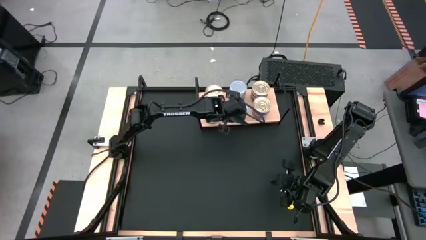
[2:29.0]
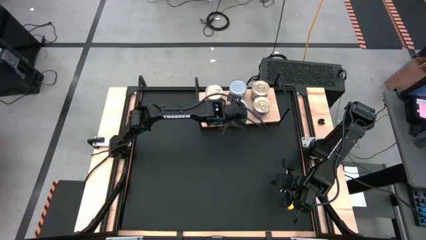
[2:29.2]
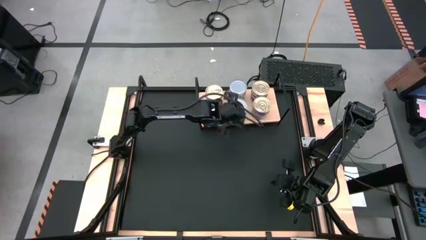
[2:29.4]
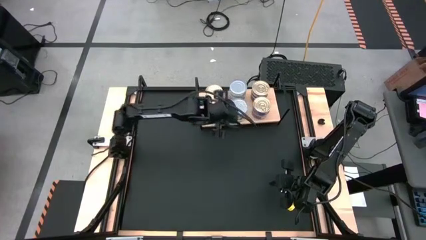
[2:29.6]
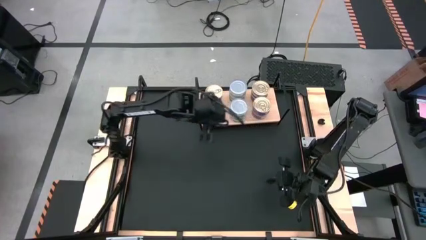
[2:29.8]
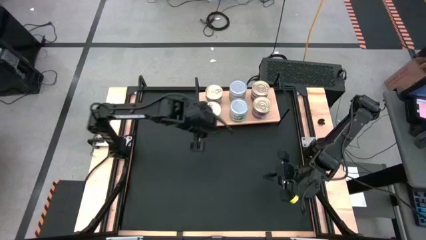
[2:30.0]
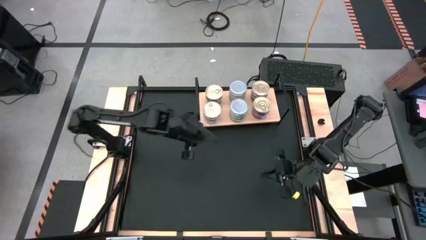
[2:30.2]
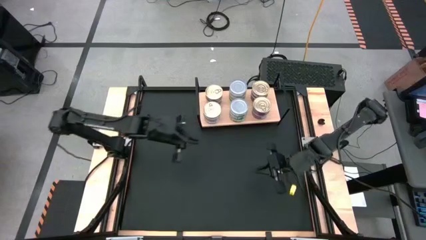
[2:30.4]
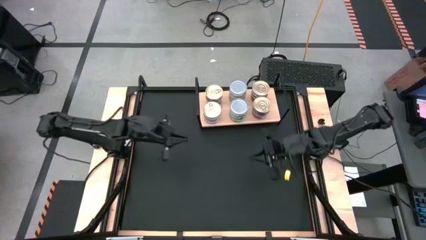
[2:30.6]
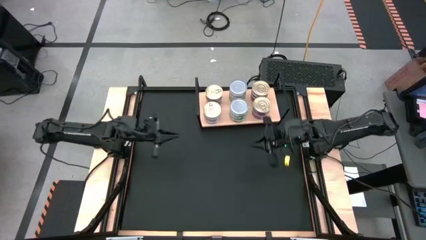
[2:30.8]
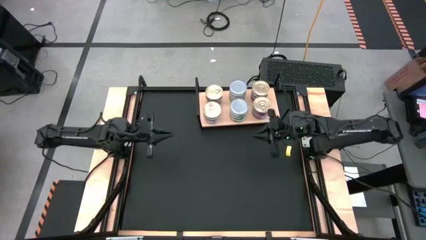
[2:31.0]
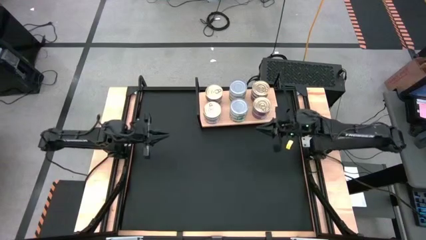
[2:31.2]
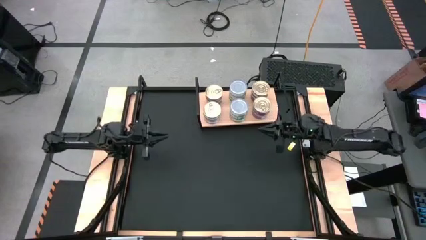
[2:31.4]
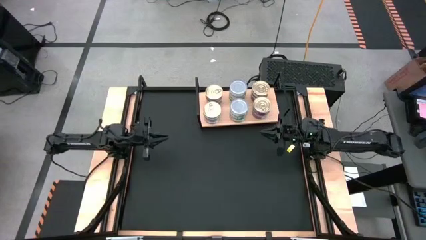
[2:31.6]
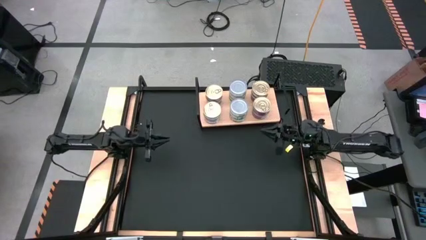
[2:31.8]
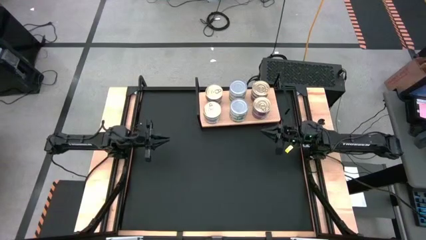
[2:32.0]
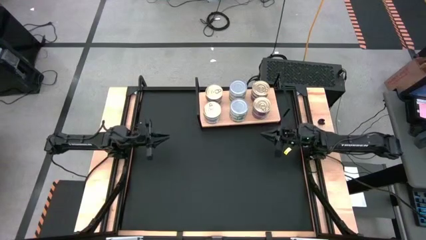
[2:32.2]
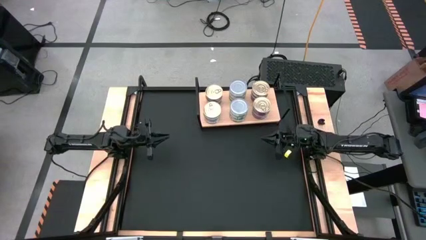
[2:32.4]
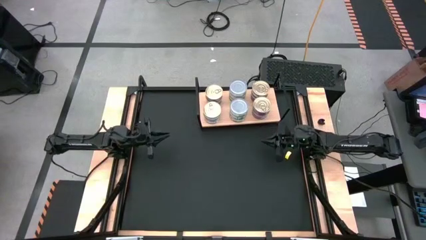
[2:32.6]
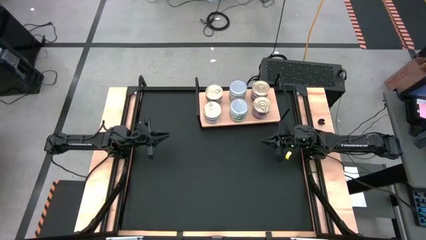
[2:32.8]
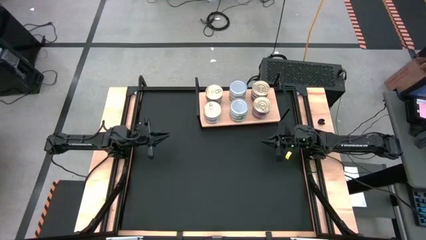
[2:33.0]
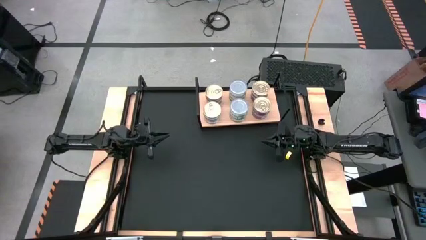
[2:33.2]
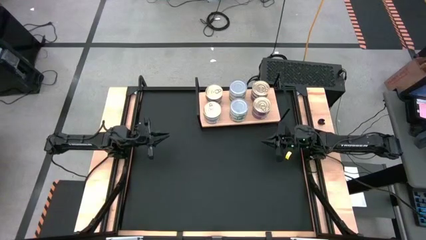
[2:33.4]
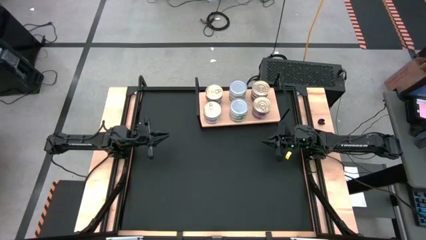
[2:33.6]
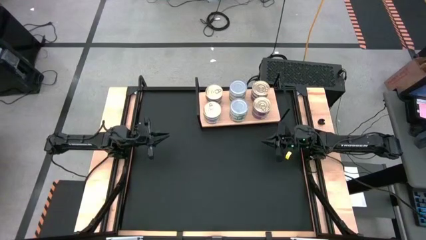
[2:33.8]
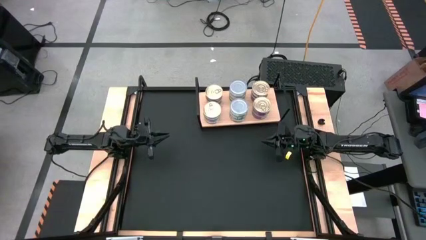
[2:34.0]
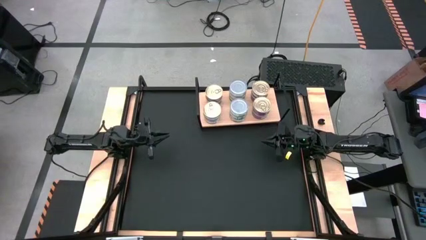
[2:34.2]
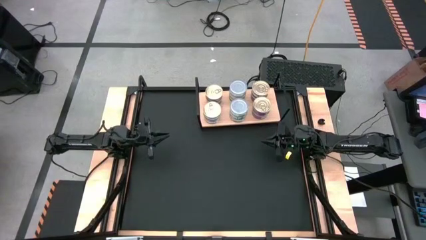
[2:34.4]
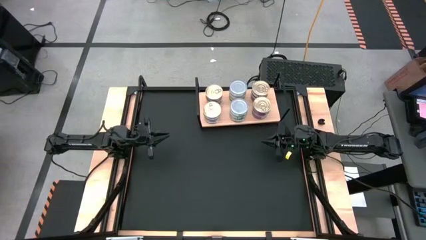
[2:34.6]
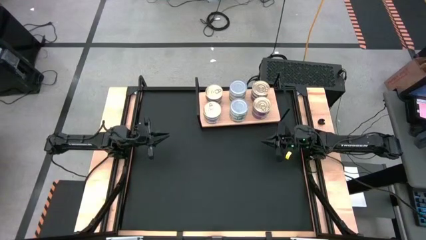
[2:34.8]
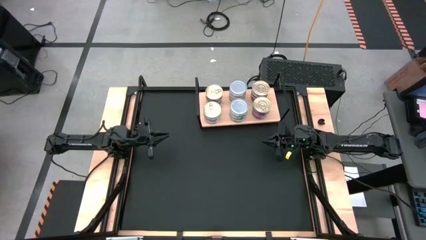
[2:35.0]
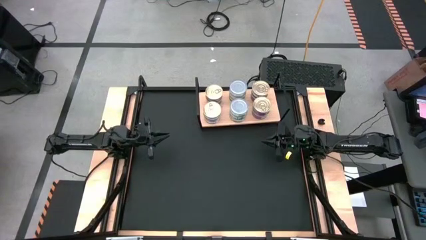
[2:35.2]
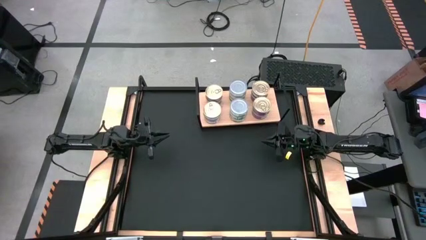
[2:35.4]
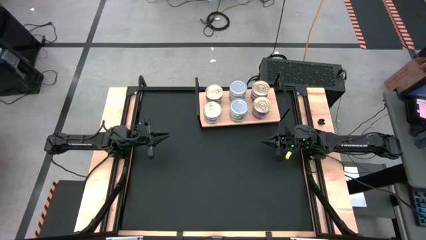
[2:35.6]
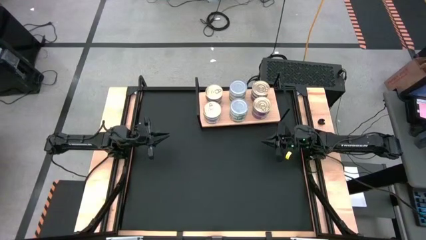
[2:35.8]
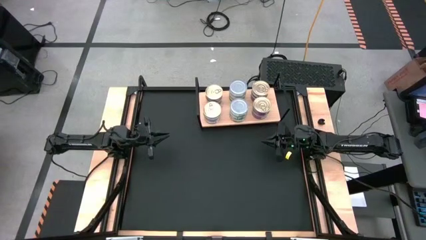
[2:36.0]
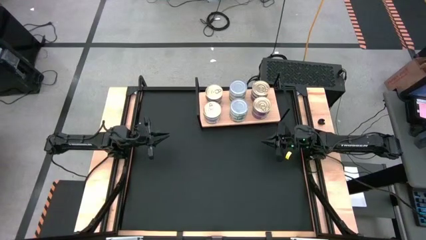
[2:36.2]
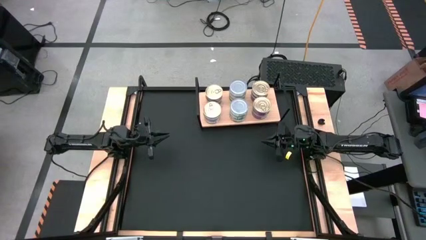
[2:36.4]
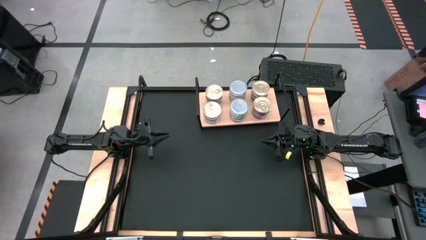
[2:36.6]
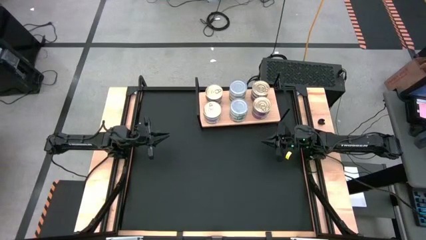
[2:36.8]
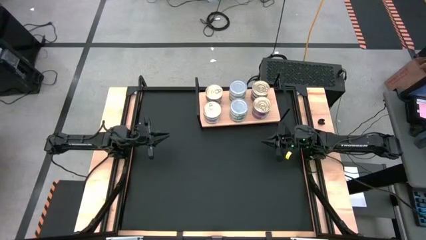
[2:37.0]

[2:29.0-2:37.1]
Task: Stack canned seafood by type on shelf
Return to Home Position

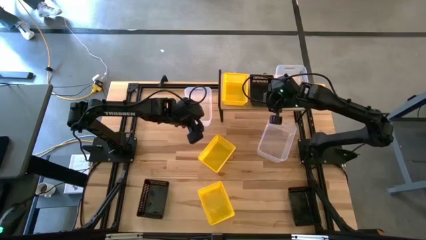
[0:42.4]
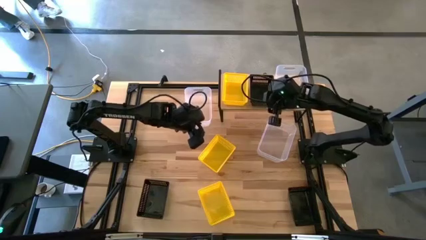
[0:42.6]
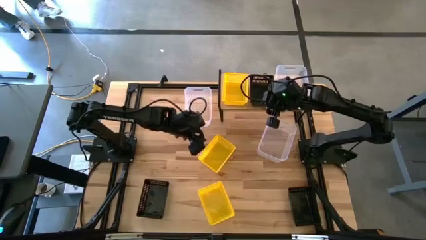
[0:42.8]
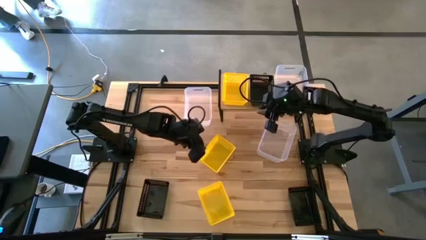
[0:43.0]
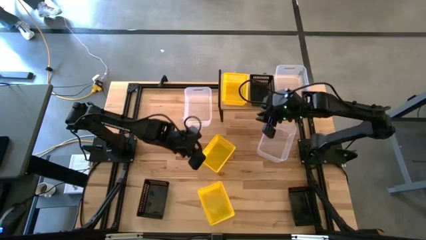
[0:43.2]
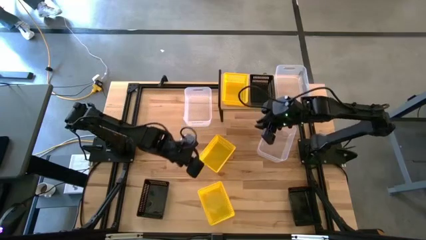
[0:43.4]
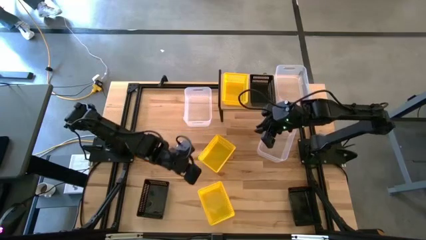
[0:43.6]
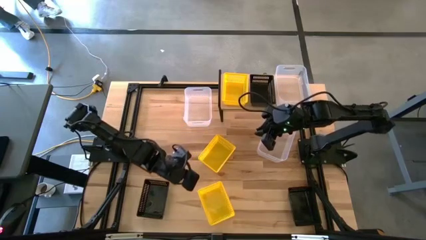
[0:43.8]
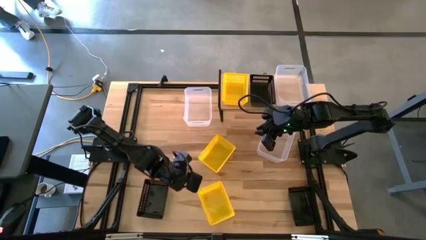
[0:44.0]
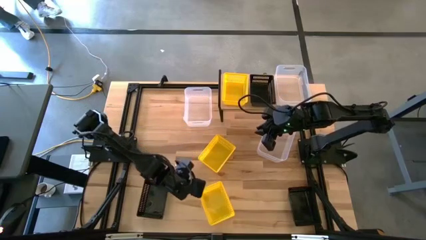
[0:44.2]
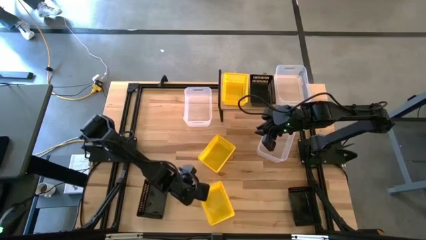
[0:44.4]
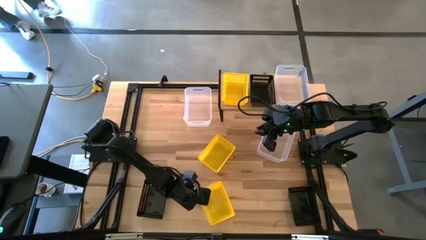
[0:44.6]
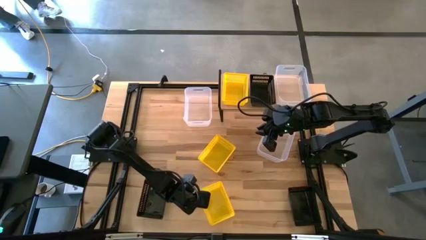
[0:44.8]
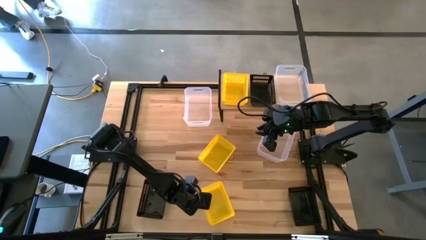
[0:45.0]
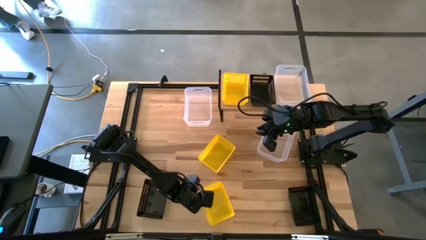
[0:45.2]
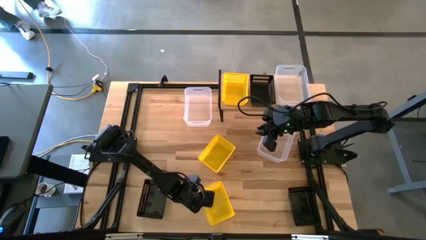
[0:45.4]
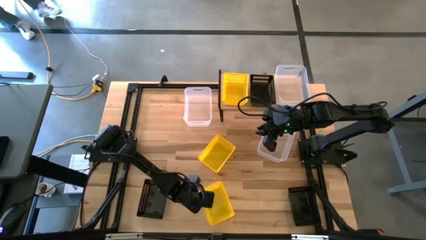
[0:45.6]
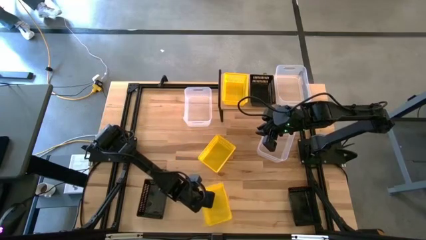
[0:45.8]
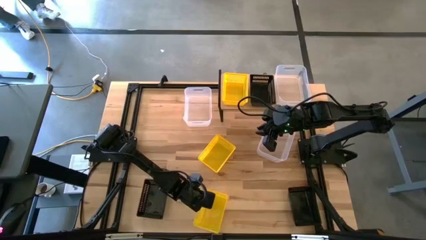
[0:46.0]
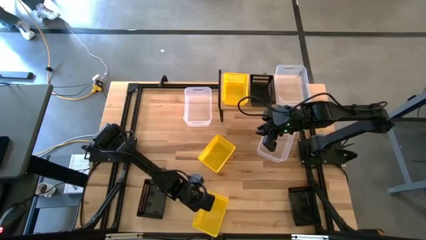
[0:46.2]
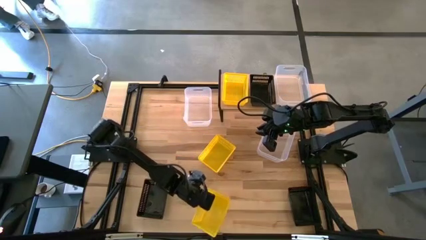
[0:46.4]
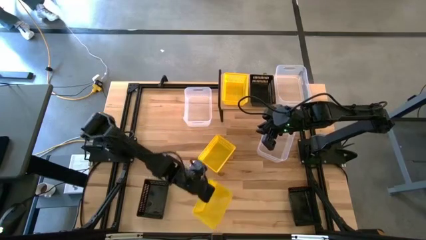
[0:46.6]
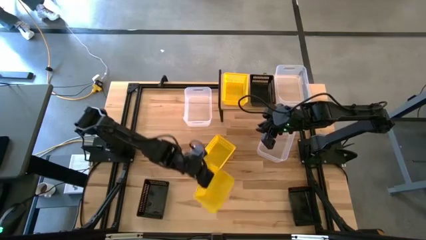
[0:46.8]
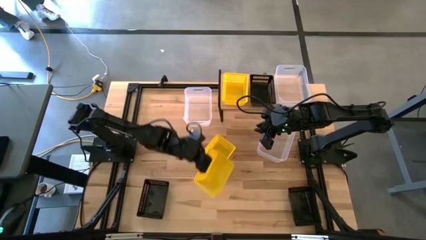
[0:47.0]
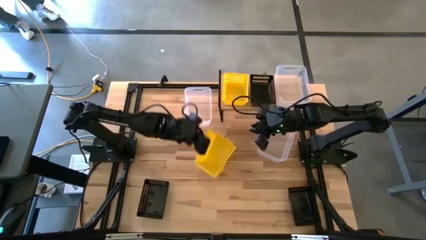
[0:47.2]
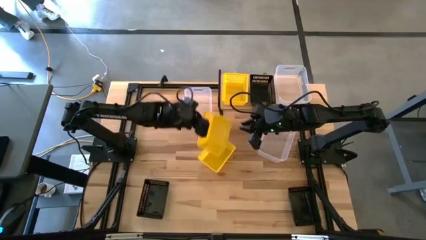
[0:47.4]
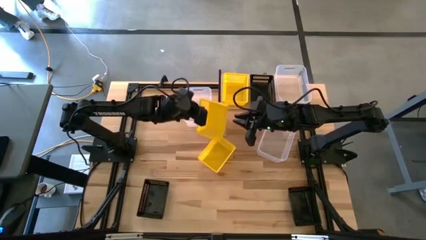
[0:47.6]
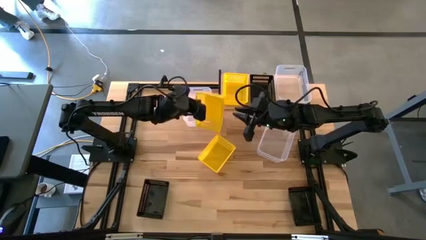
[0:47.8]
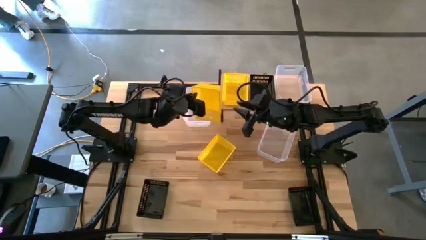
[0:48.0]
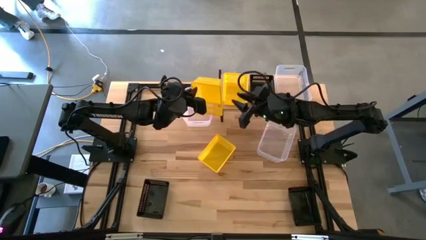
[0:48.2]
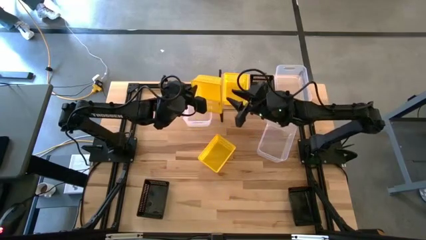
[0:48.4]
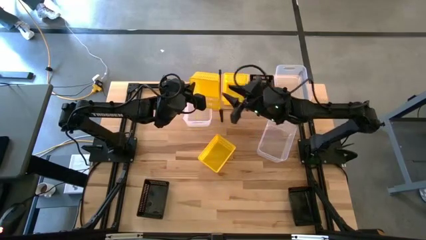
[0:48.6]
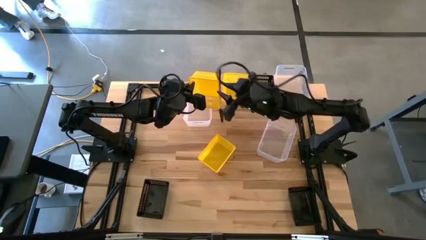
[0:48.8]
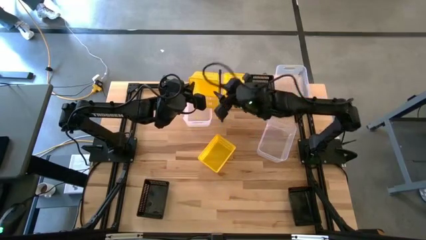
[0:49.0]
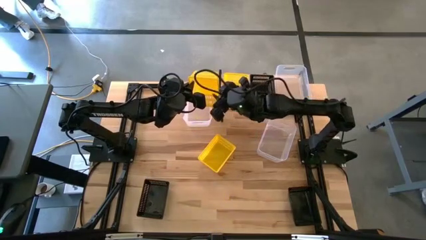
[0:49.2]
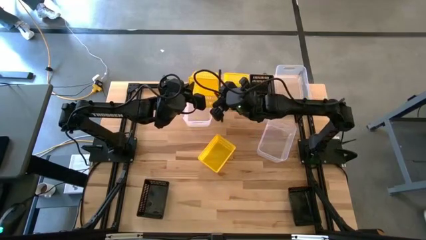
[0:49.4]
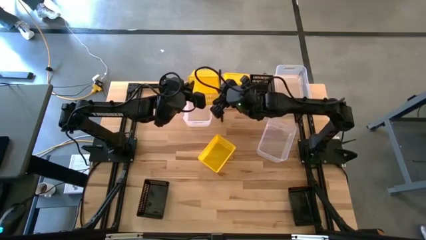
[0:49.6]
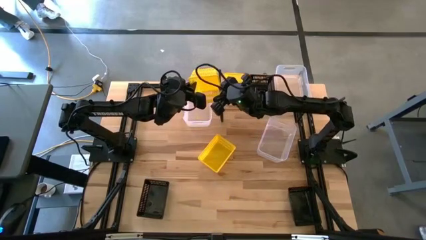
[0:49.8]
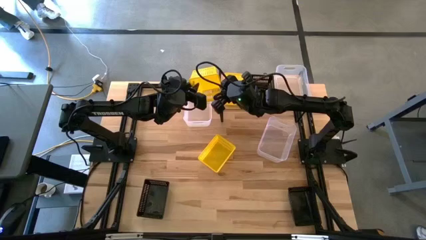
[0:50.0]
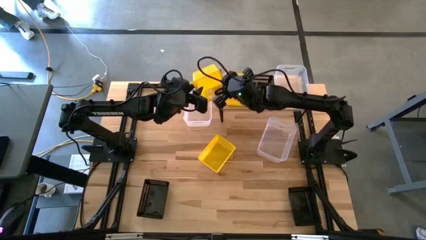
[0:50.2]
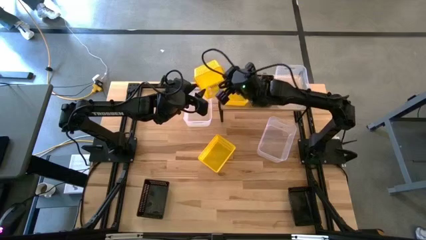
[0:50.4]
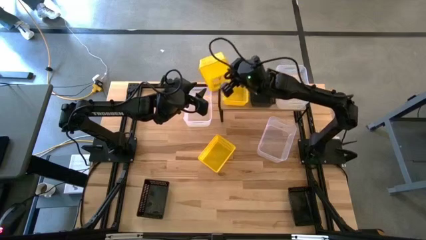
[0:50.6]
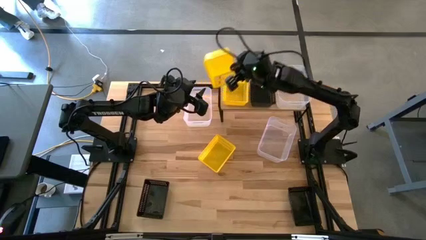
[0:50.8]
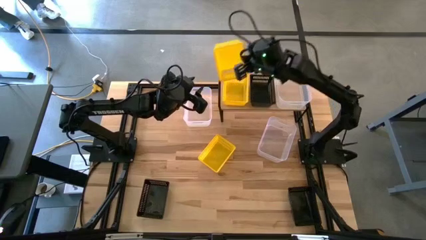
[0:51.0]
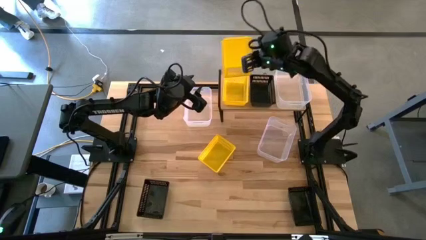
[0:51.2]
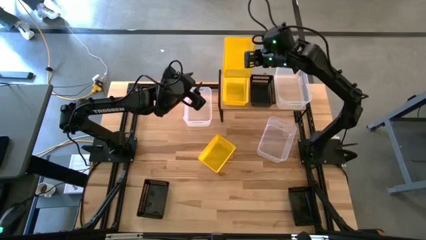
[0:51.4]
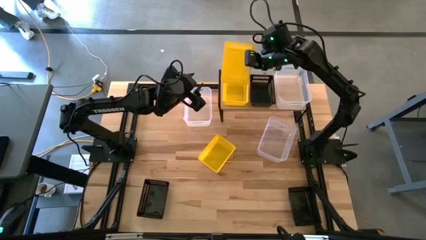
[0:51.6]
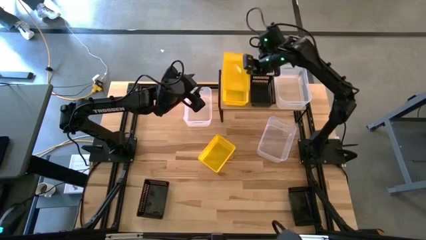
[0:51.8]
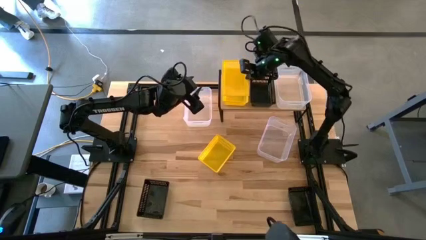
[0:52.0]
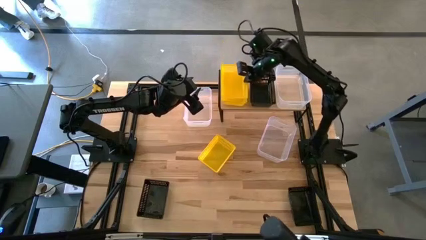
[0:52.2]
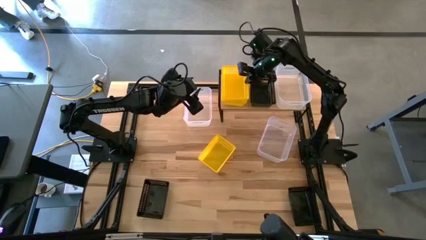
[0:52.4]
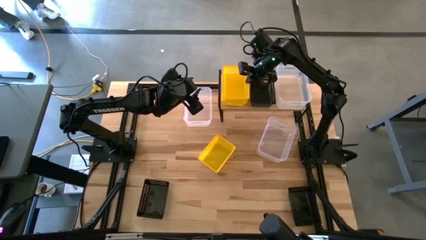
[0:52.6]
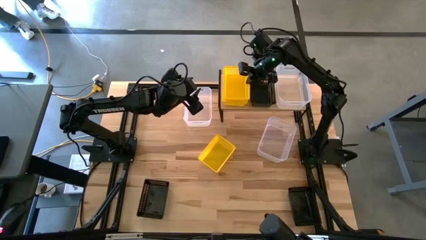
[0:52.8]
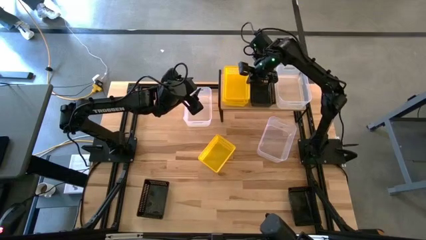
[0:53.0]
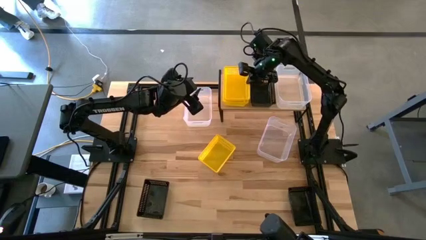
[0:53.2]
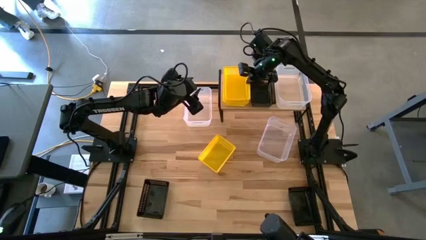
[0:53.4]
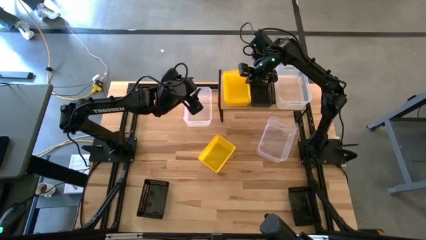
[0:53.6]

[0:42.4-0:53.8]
Task: Stack baskets on shelf by color
Stack the bottom yellow bin on top of the other yellow bin on the shelf
